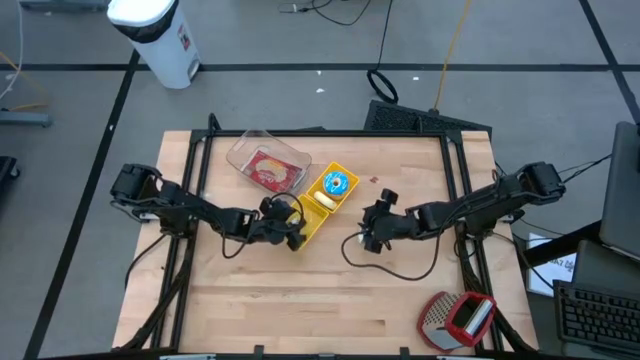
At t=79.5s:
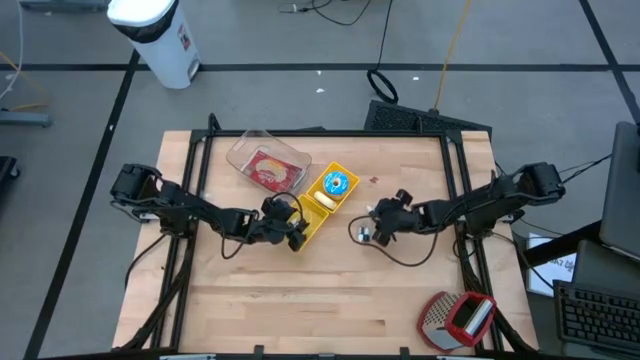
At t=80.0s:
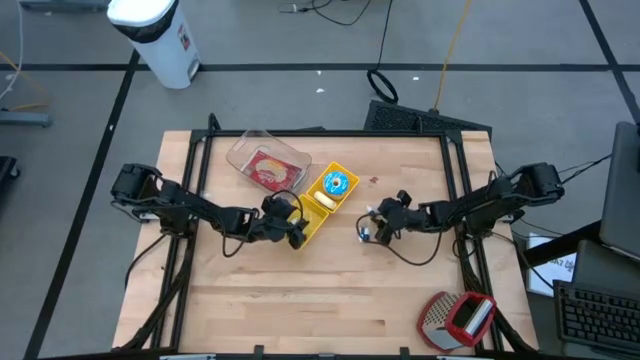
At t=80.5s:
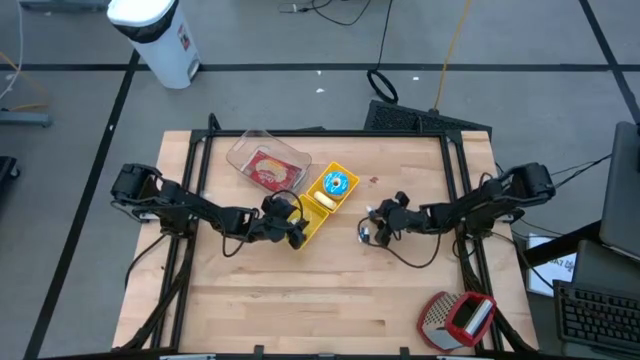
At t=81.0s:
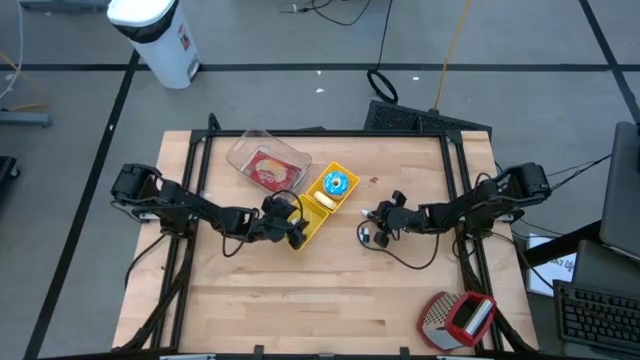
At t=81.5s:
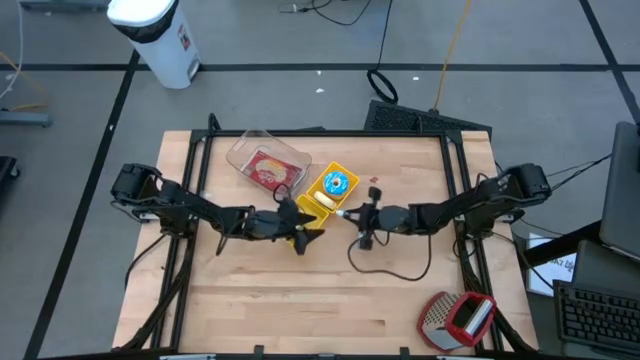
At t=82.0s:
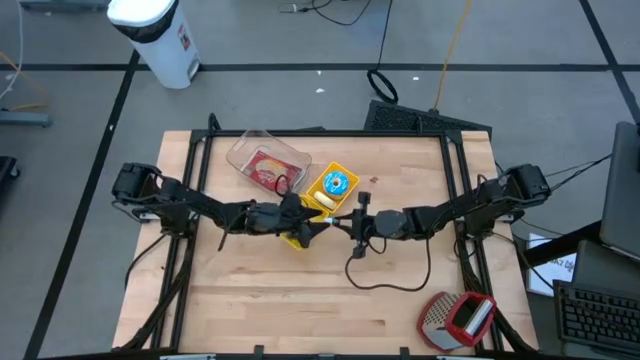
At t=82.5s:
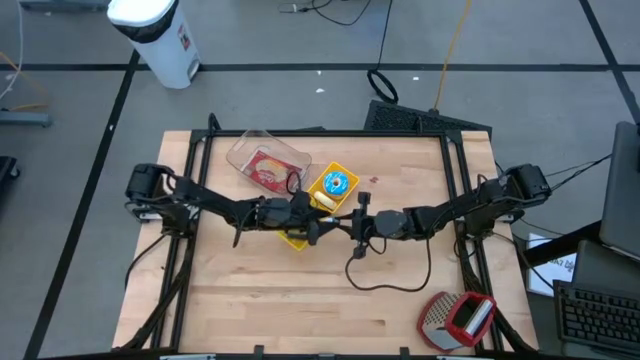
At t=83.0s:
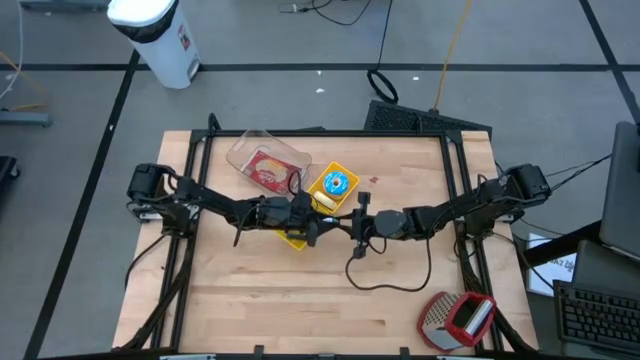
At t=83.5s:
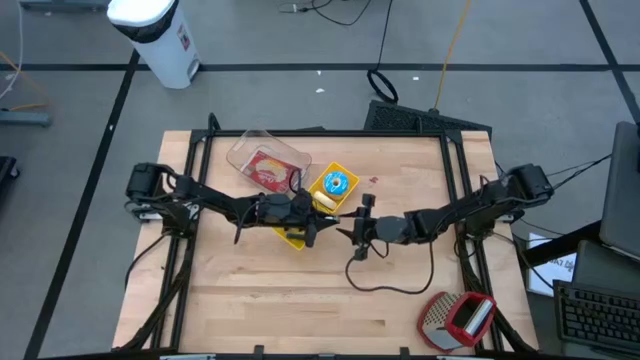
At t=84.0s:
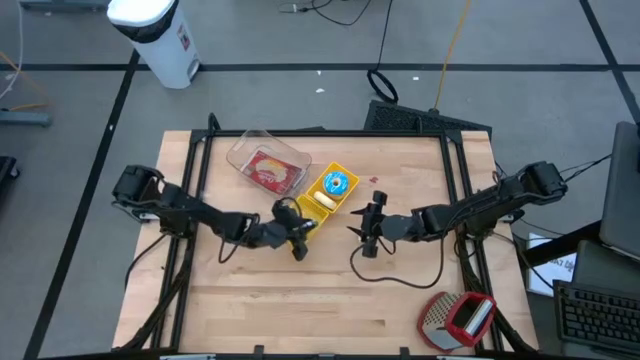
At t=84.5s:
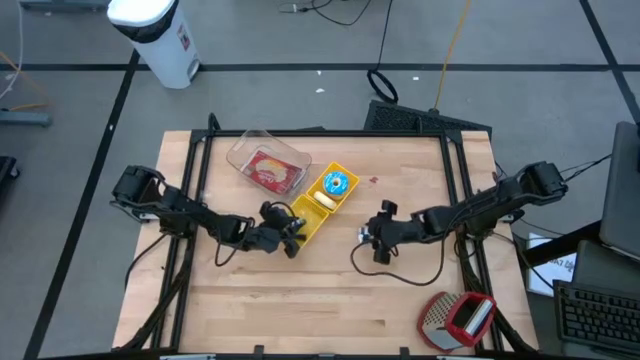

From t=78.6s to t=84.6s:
Put the top green food coloring bottle into the bottom yellow bin

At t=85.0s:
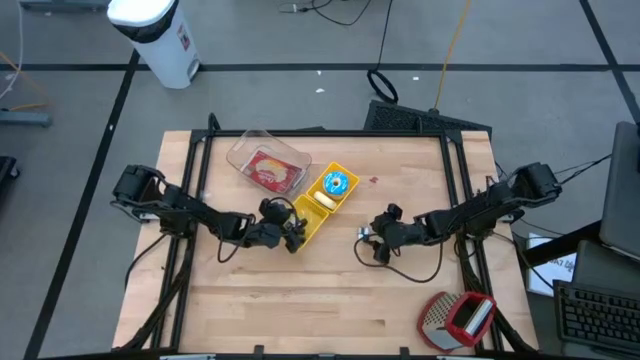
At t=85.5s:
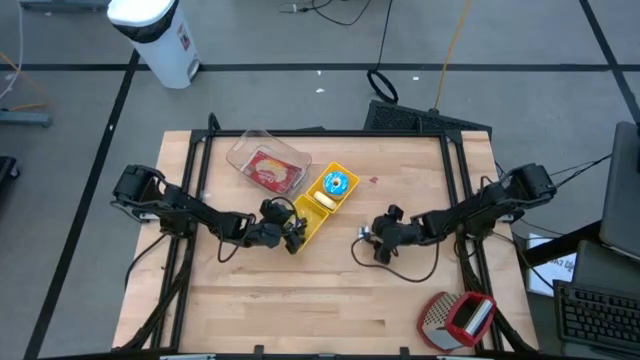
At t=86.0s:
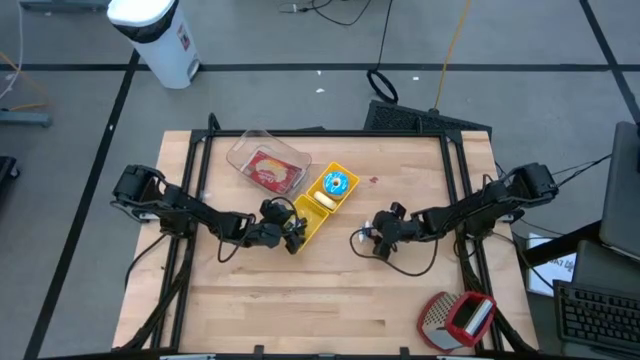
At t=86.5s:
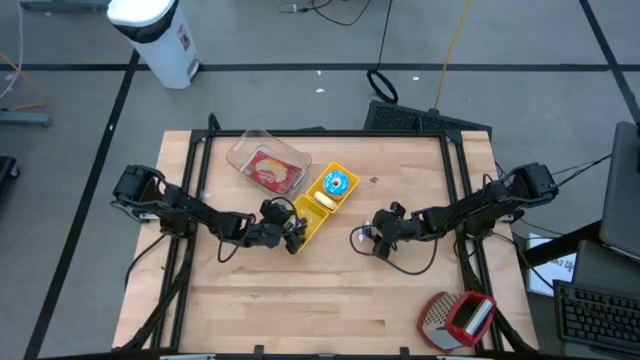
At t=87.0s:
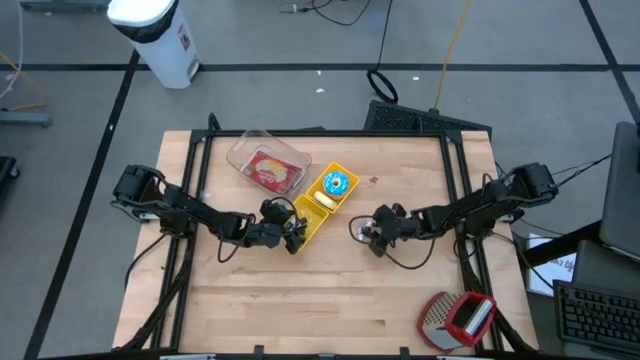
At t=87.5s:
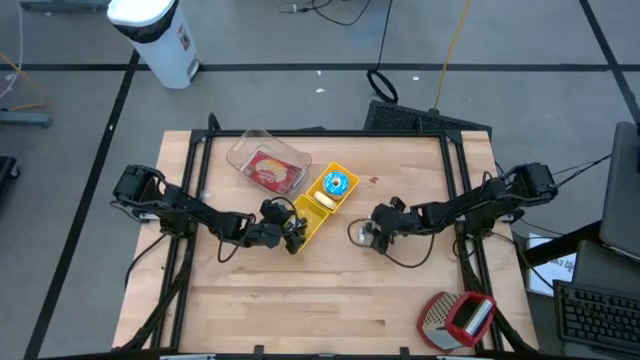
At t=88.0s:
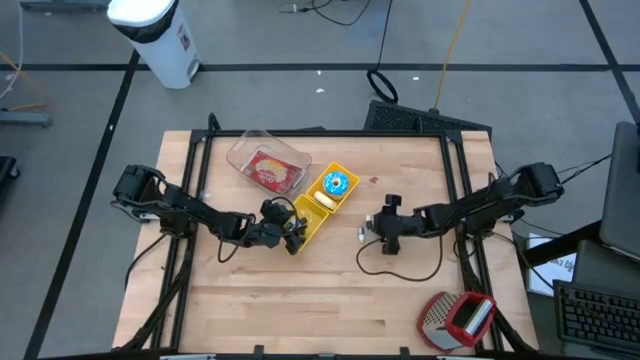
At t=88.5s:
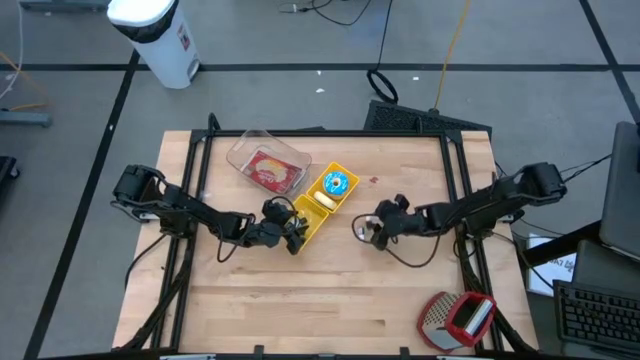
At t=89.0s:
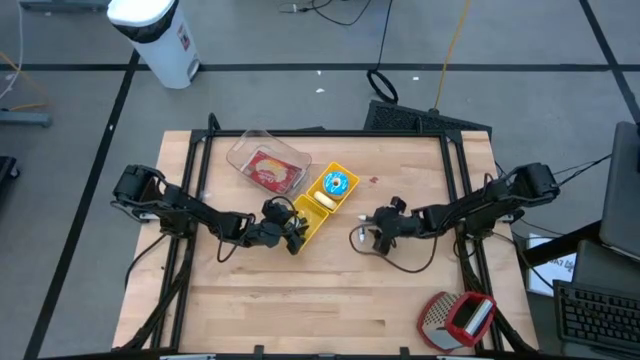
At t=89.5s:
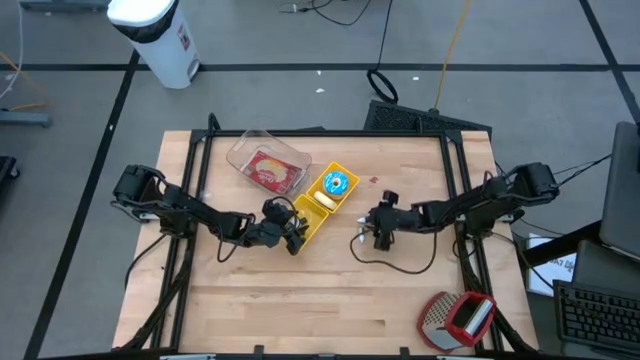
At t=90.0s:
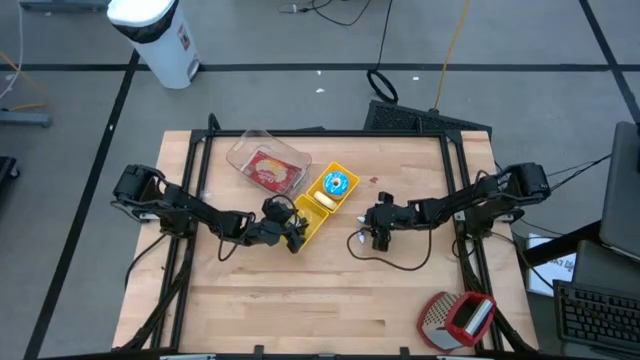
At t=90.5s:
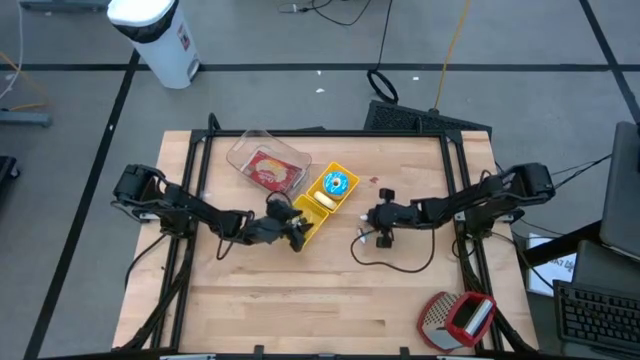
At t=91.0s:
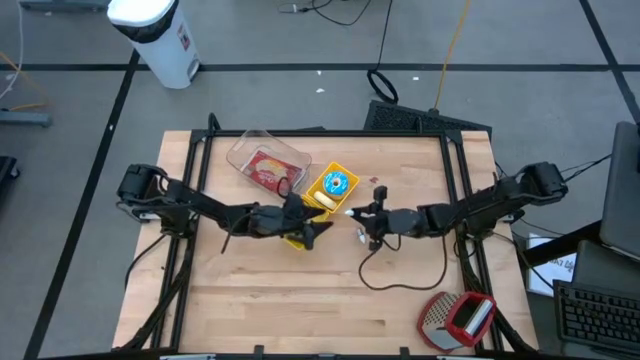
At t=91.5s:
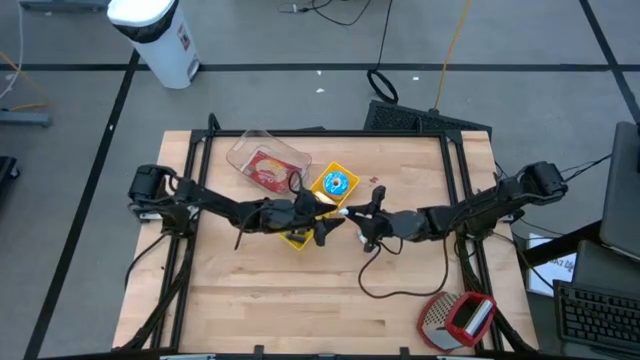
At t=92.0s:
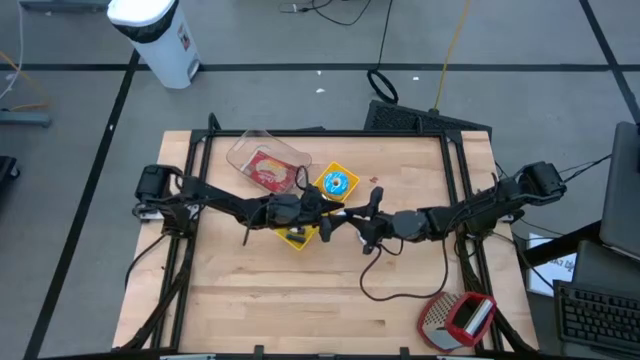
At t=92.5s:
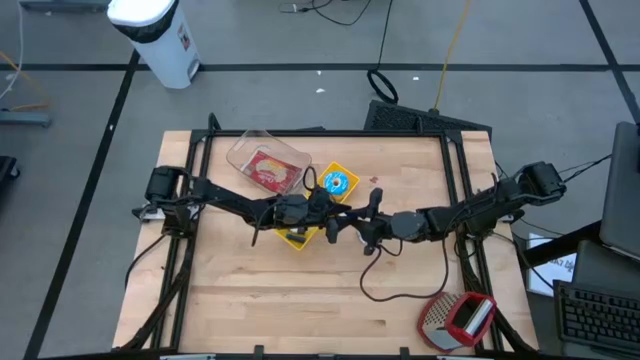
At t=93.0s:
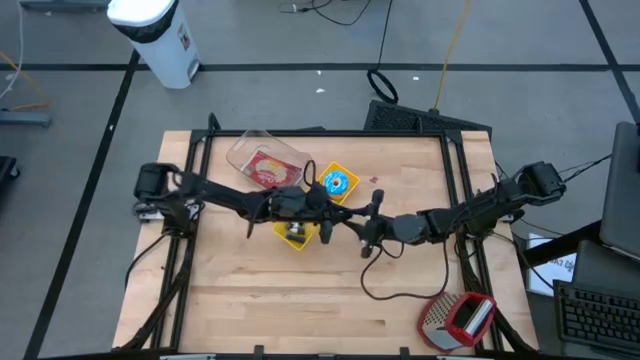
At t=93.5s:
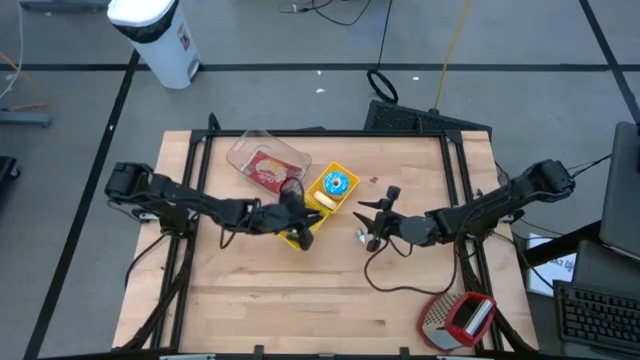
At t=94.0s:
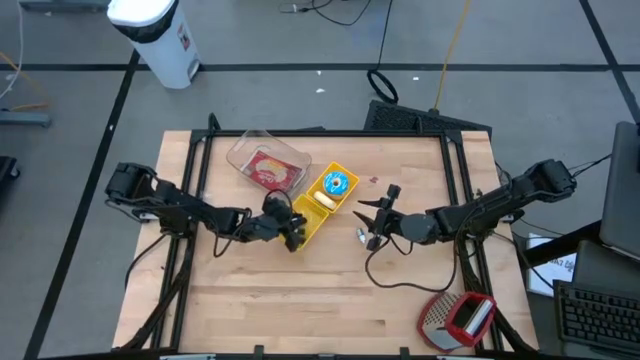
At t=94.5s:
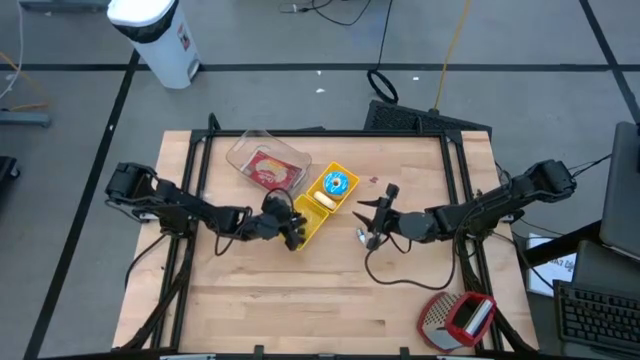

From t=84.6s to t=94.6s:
Put the purple food coloring bottle into the bottom yellow bin

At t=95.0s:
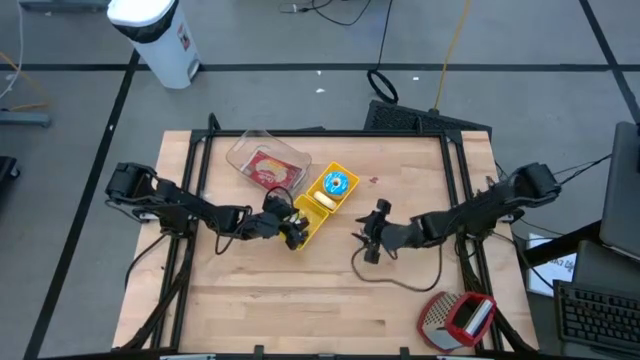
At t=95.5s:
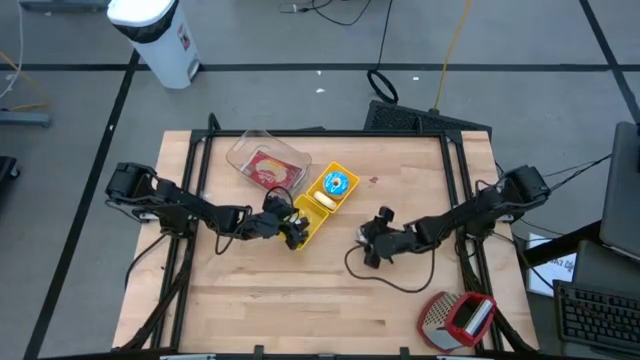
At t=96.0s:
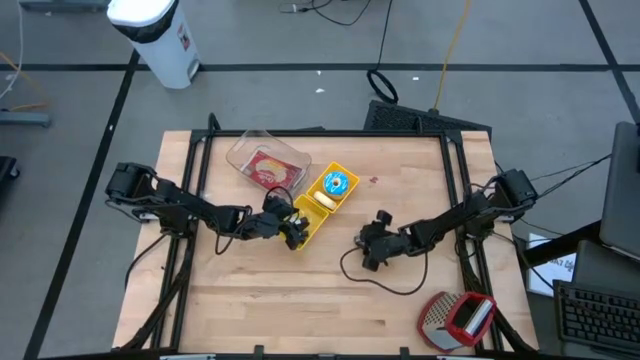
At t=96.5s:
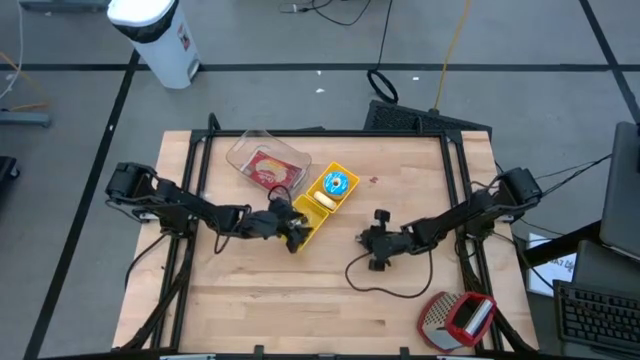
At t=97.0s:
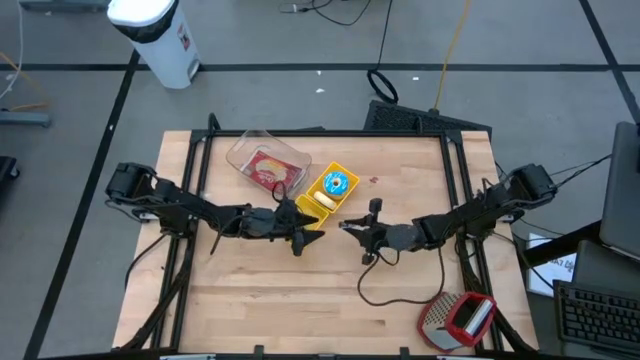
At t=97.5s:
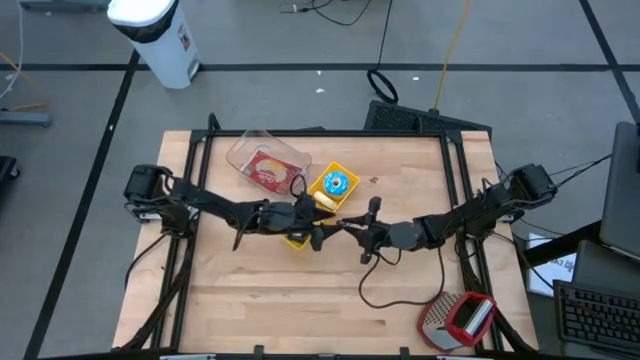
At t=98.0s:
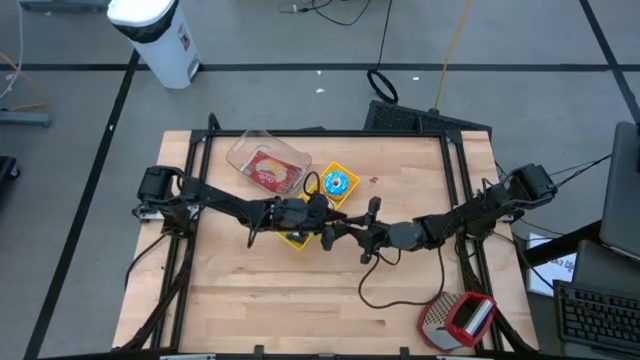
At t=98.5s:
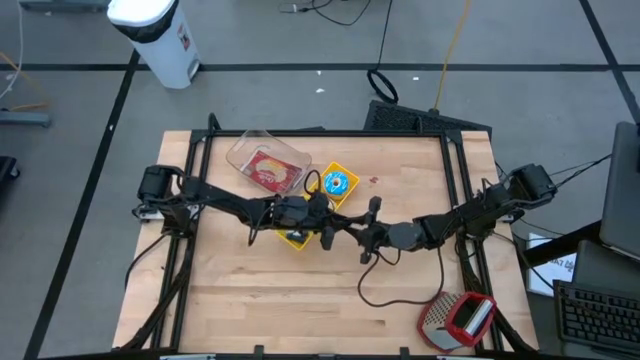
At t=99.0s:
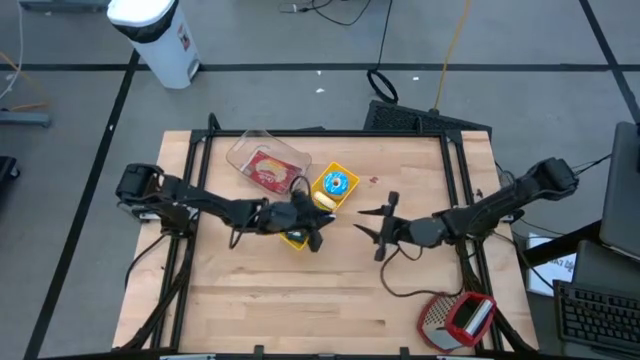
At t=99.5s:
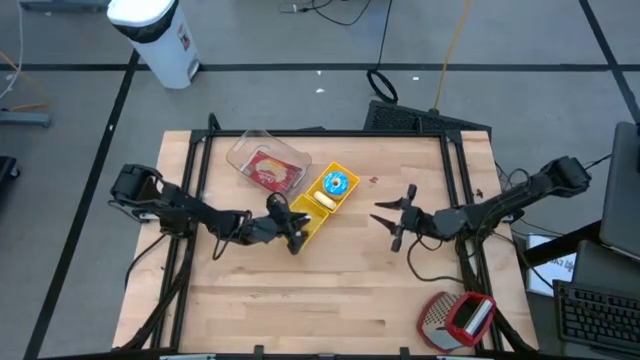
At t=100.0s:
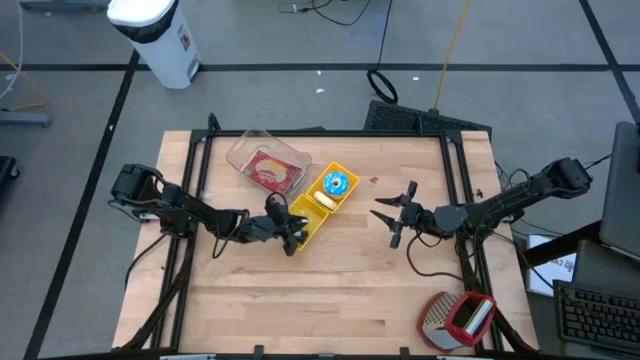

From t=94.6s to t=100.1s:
Put the green food coloring bottle into the bottom yellow bin
